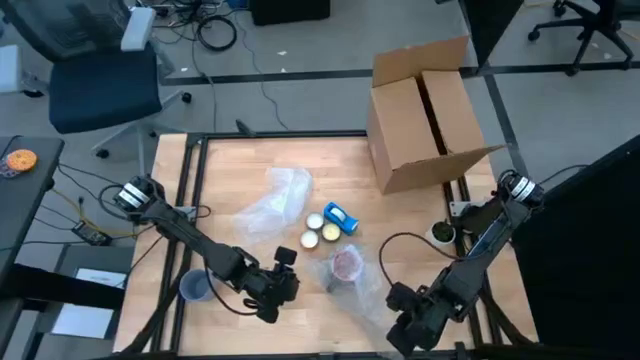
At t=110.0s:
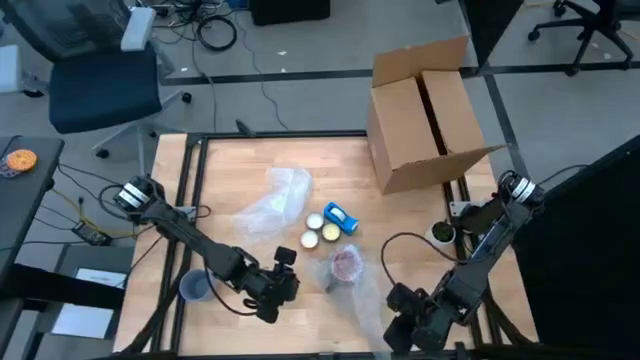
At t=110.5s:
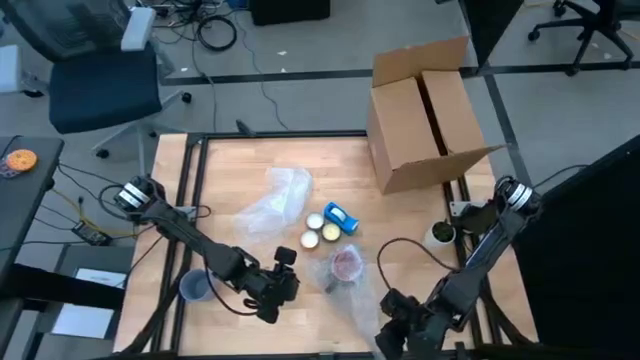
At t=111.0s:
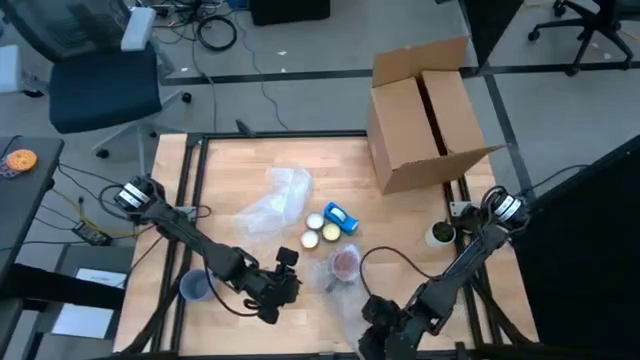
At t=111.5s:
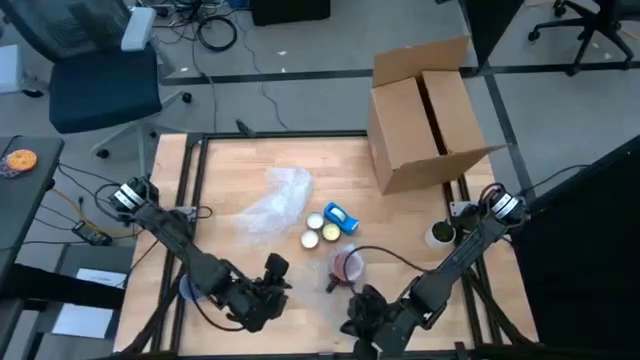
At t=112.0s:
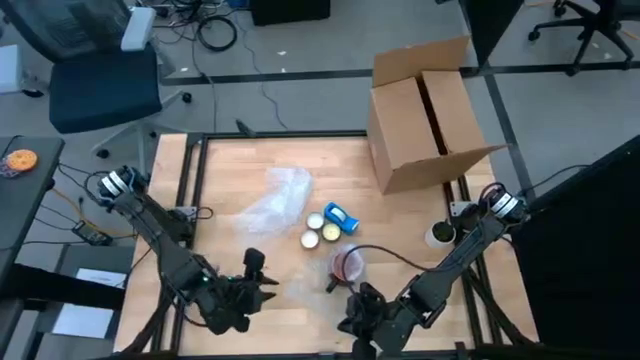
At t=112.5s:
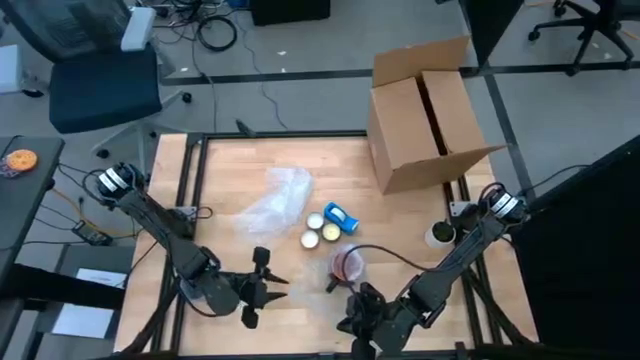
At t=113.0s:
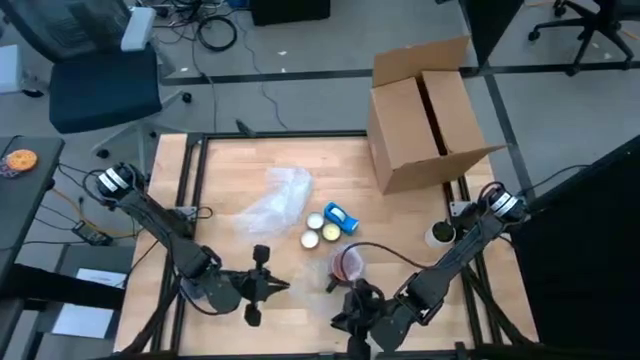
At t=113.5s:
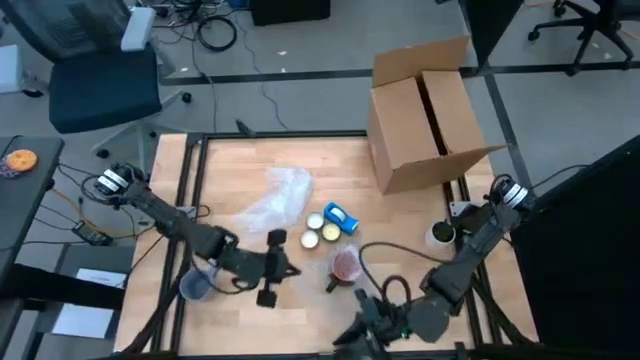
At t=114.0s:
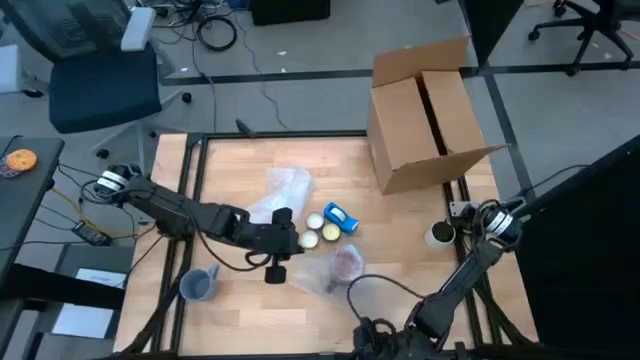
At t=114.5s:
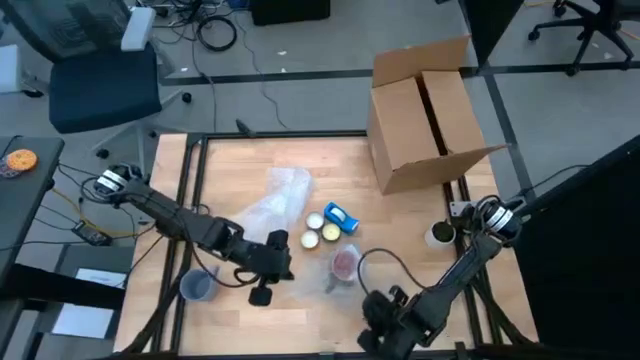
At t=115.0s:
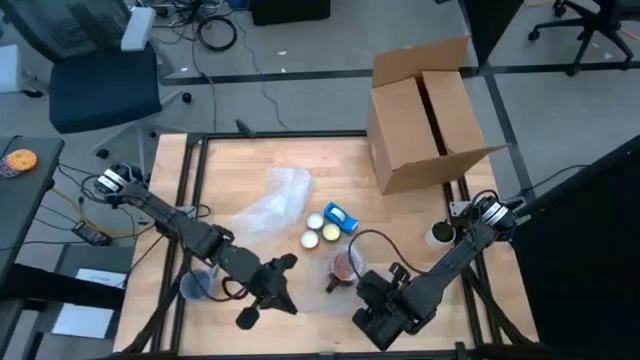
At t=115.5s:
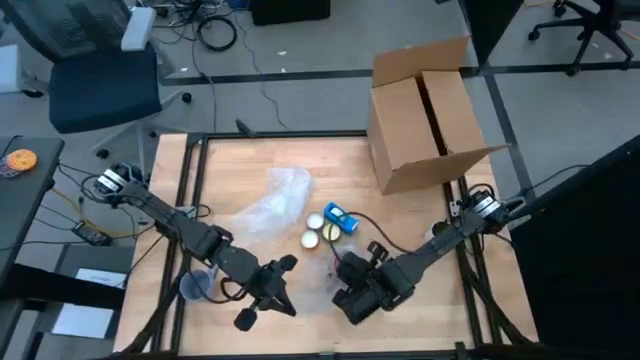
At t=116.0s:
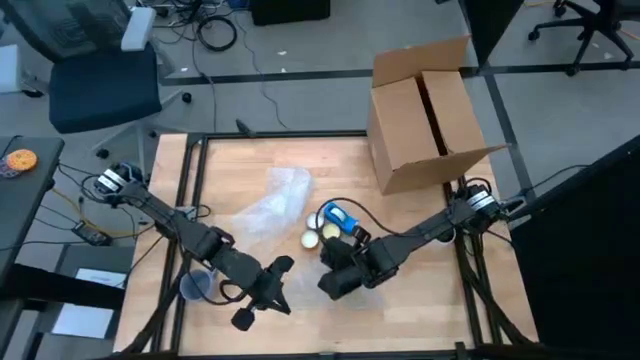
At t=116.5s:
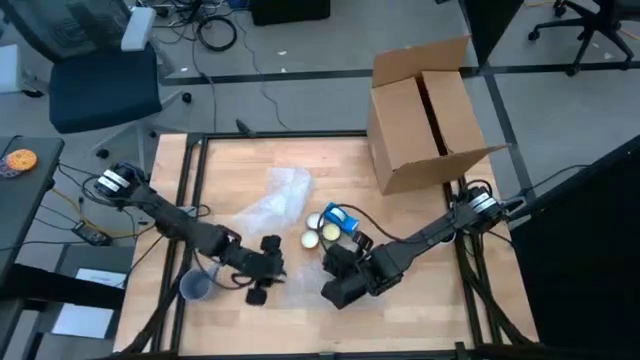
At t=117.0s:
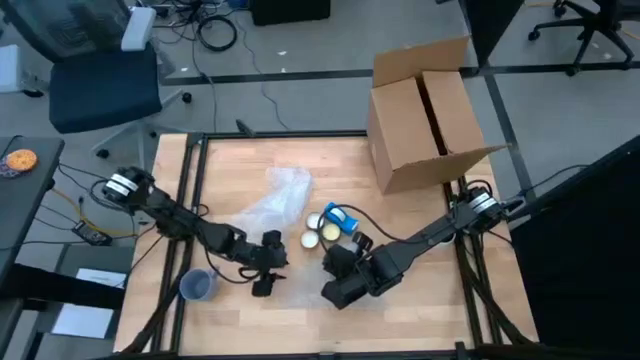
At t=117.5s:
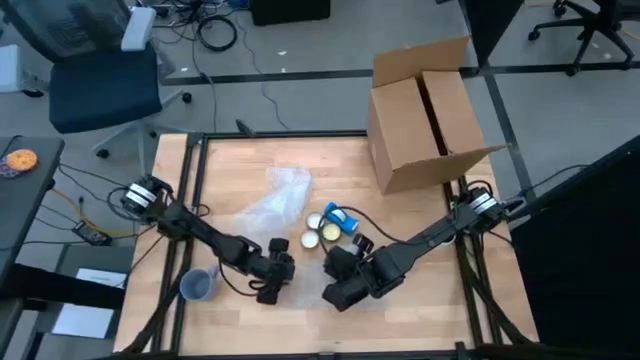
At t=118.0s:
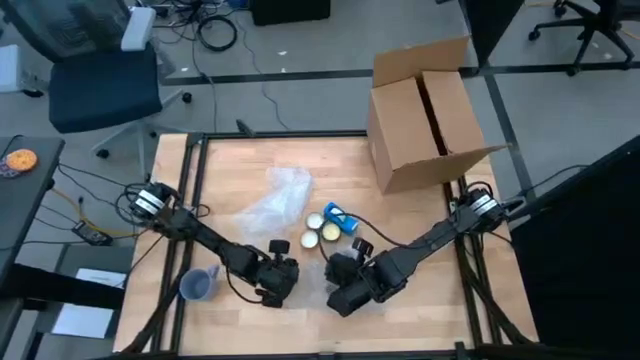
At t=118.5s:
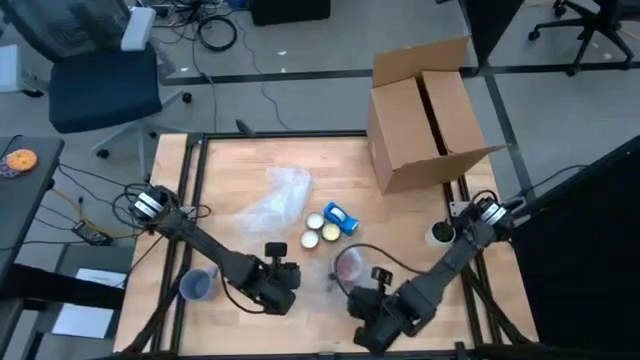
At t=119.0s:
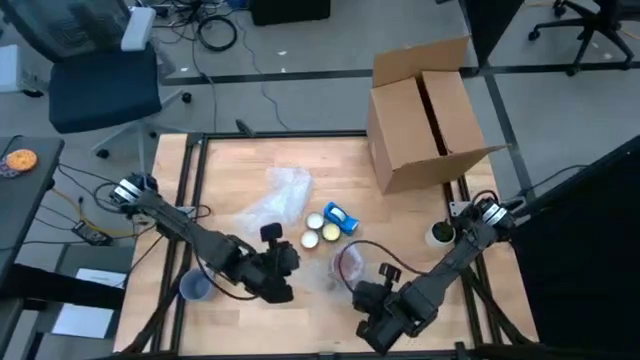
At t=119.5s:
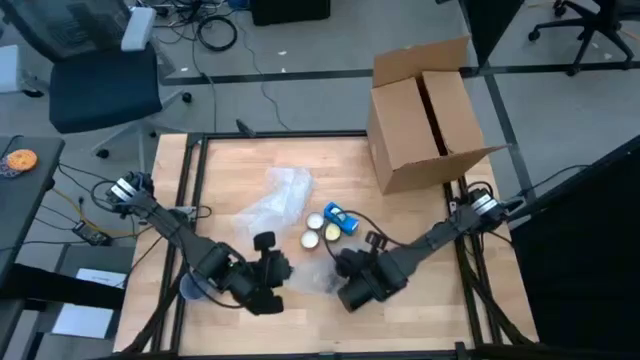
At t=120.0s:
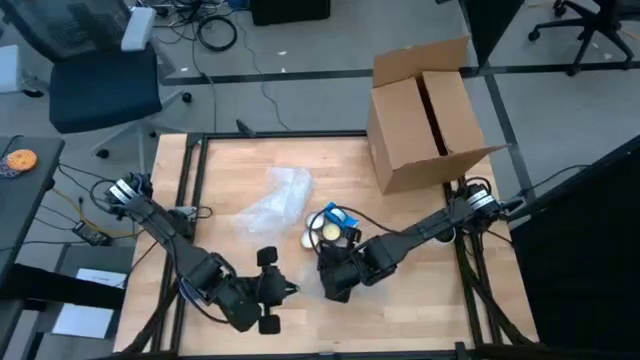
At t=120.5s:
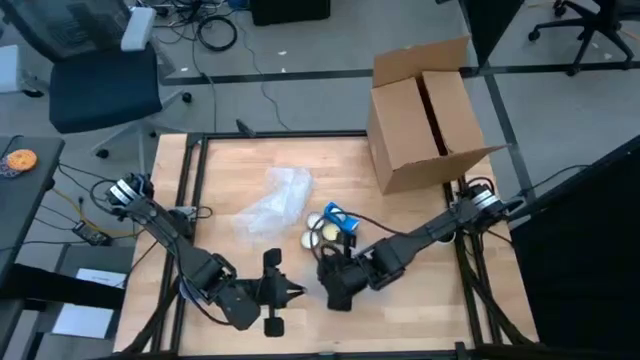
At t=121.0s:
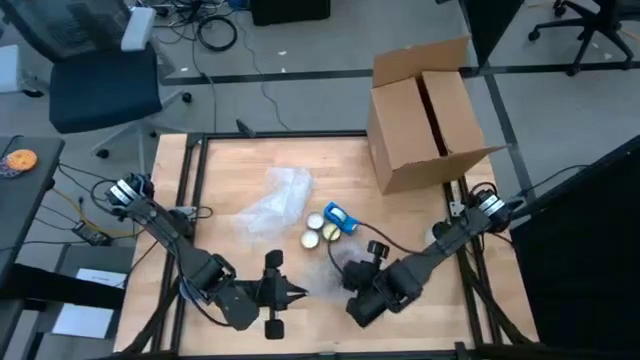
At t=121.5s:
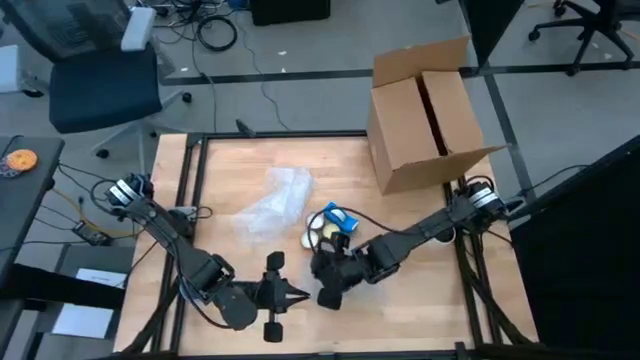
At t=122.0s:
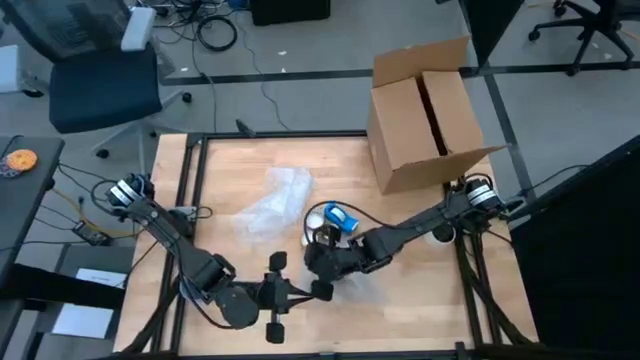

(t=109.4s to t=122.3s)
Task: wrap mug
Wrap the black mug with the transparent bubble wrap

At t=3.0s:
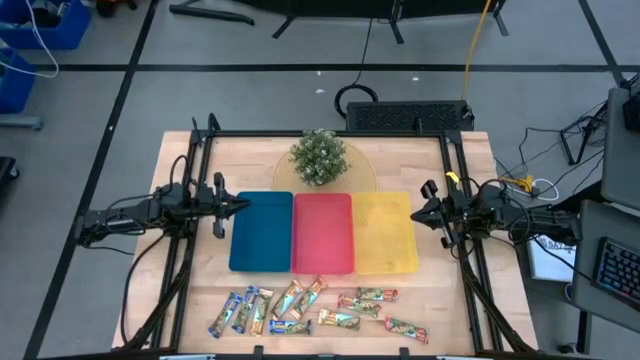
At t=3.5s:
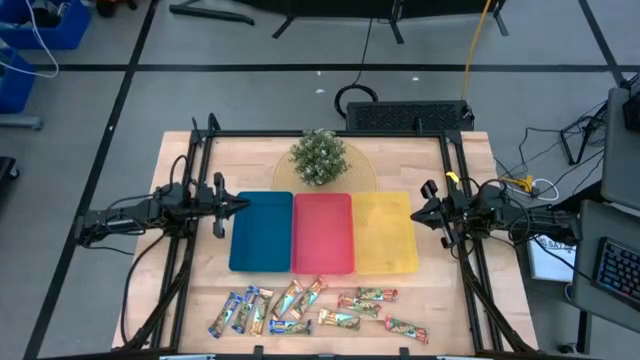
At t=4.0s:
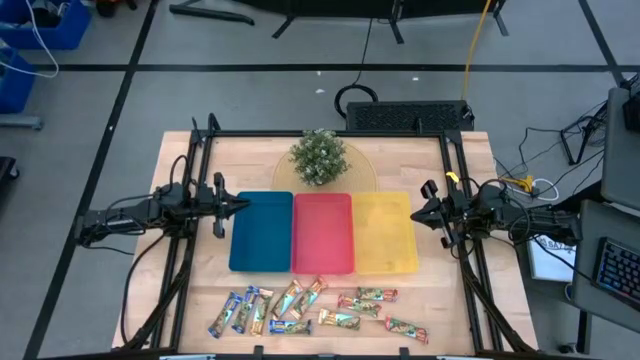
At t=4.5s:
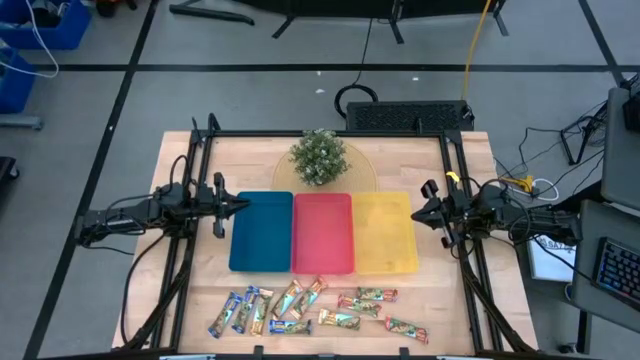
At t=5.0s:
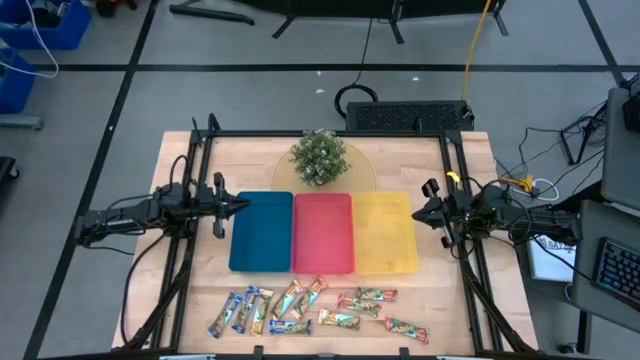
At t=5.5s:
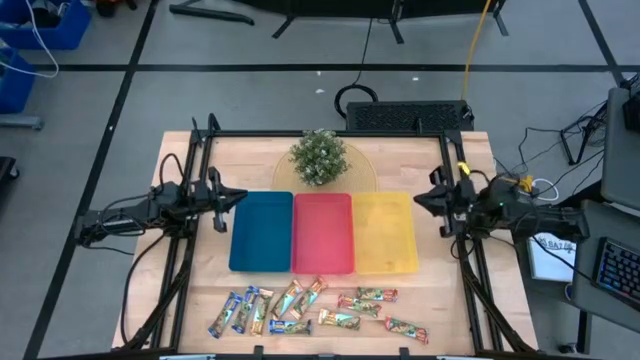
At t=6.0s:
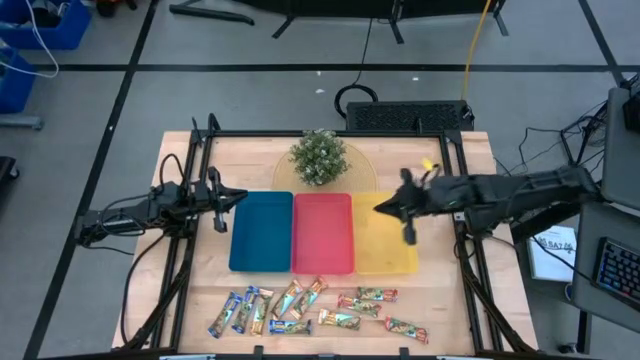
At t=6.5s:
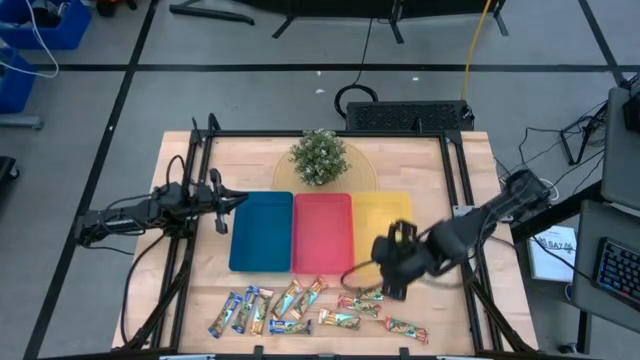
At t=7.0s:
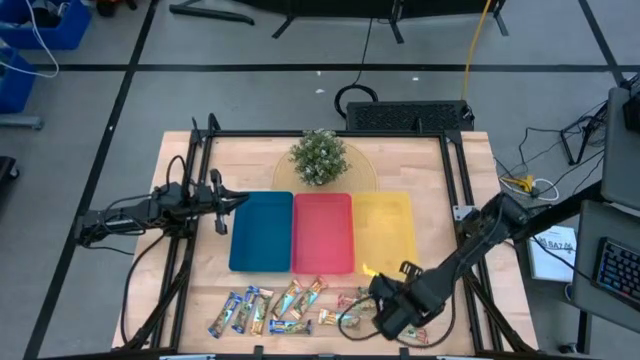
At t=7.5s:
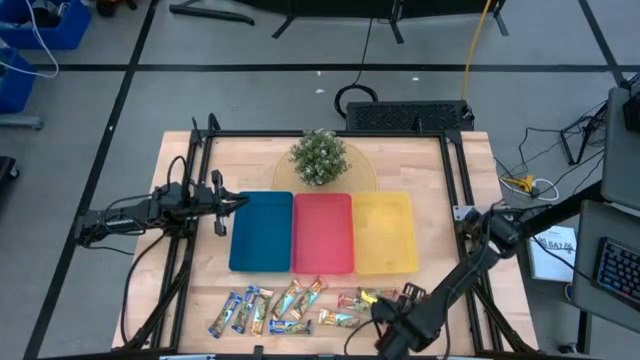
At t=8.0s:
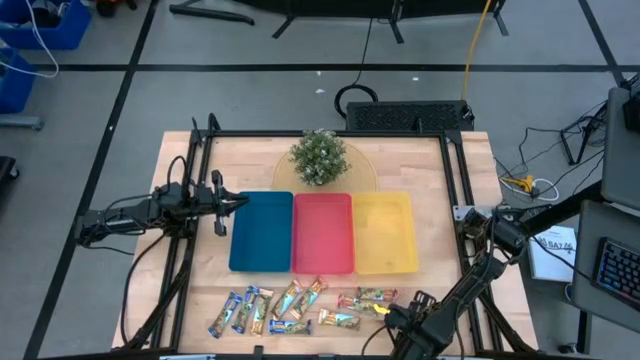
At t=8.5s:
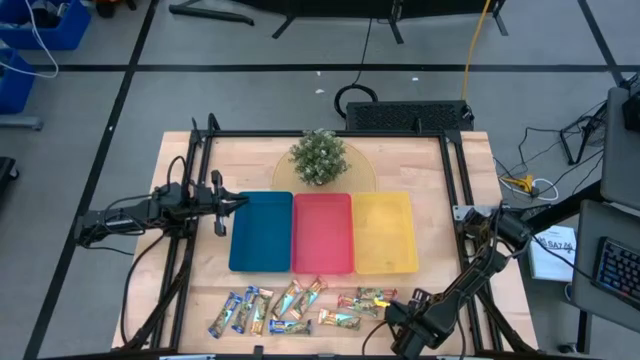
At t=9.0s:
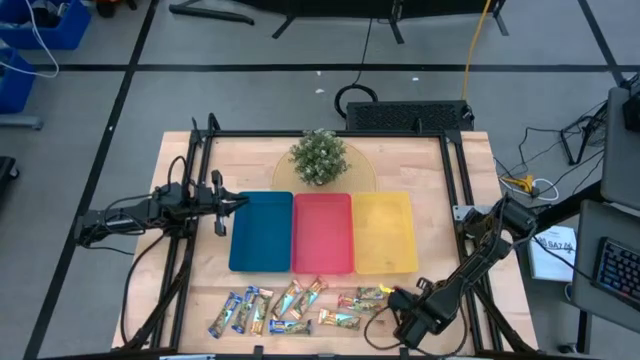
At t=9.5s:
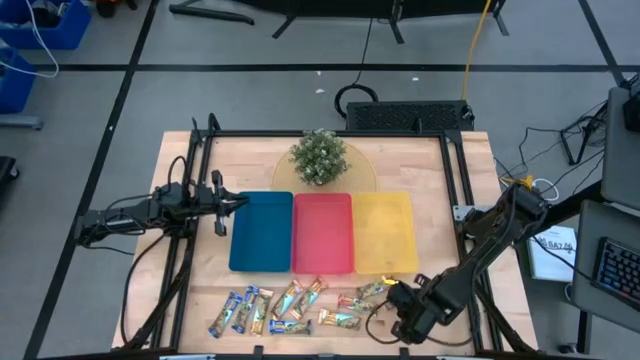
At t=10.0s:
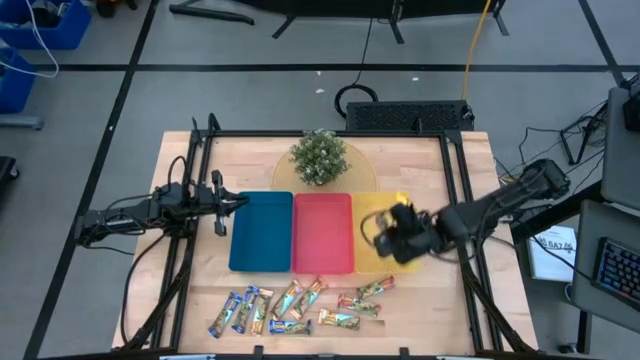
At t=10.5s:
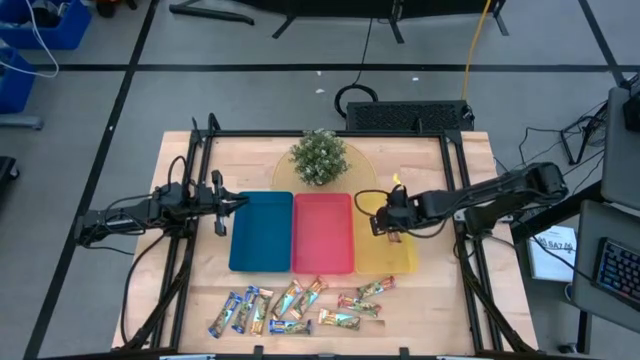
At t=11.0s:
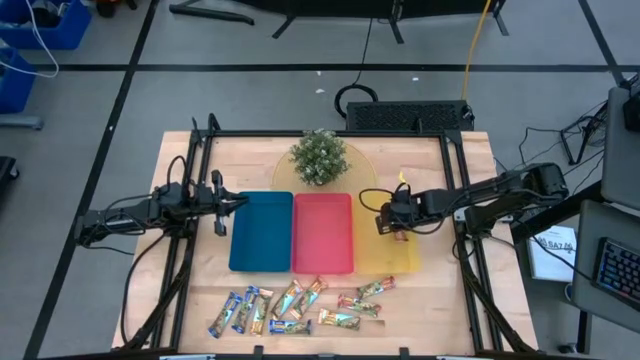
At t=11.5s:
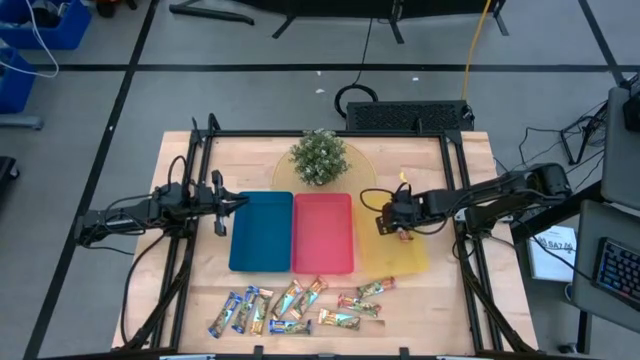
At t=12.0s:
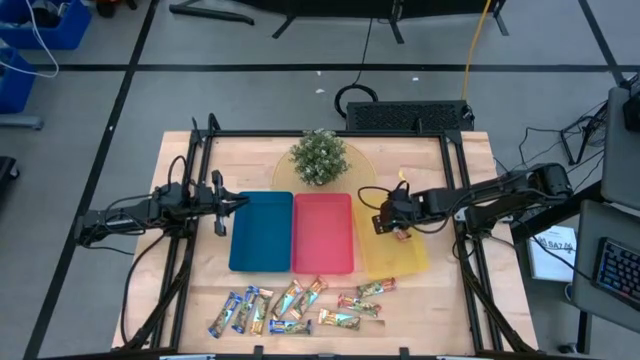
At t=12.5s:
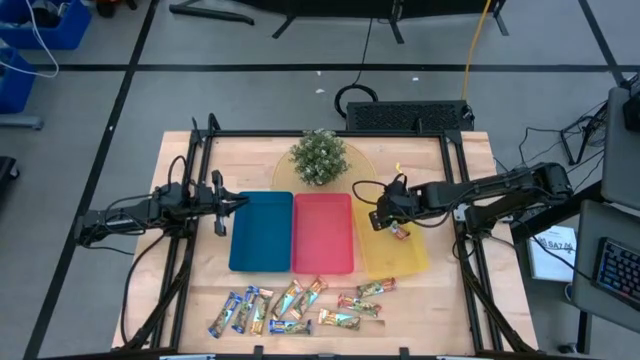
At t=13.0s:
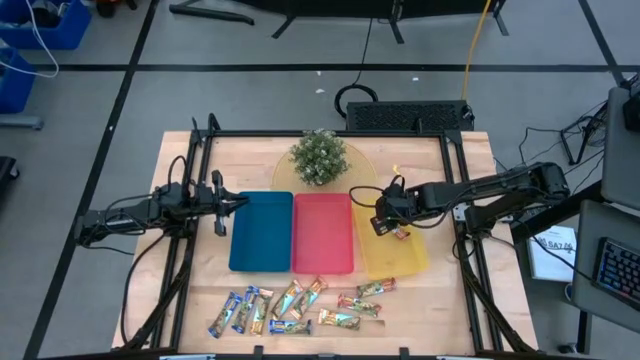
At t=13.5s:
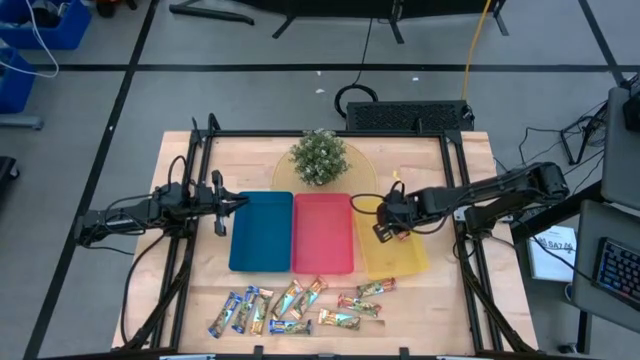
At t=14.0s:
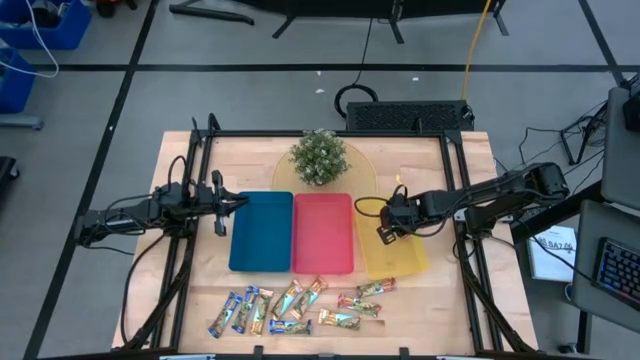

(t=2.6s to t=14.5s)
Task: Pick and place Granola Bars by type
Put the bottom red granola bar into the yellow bin
